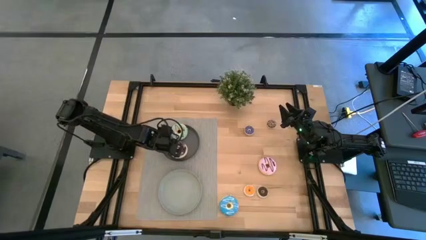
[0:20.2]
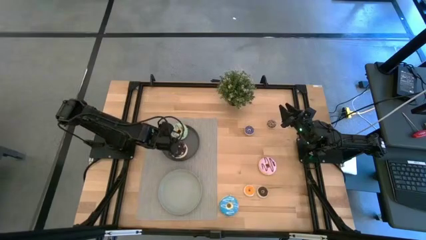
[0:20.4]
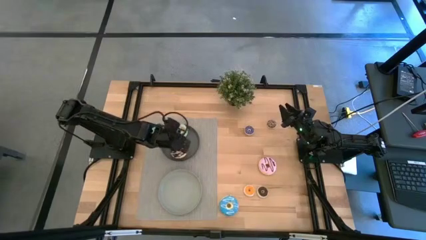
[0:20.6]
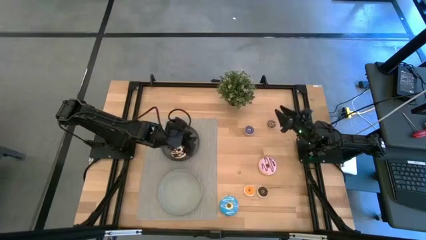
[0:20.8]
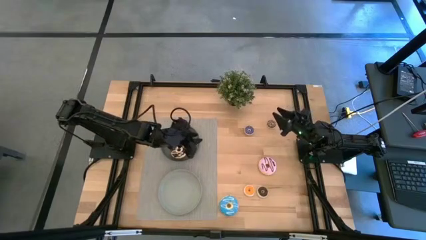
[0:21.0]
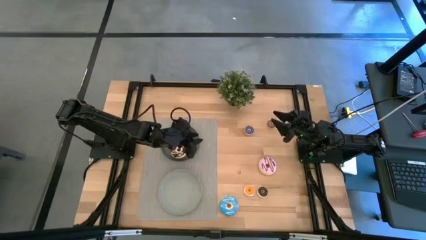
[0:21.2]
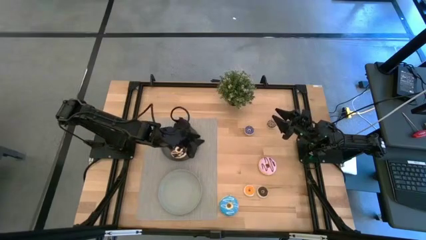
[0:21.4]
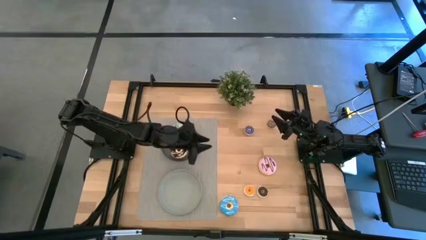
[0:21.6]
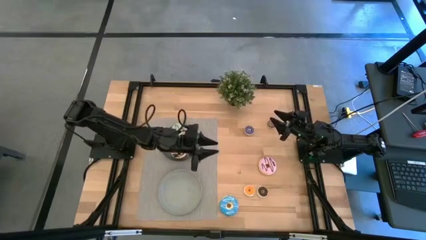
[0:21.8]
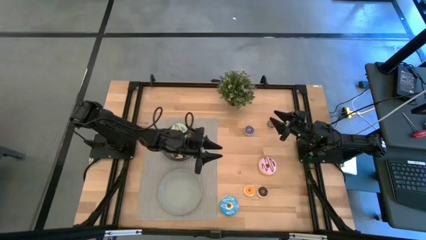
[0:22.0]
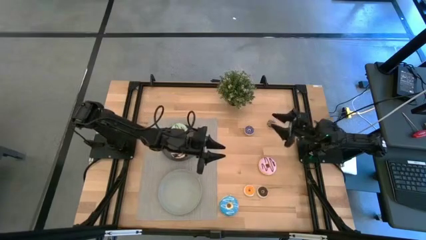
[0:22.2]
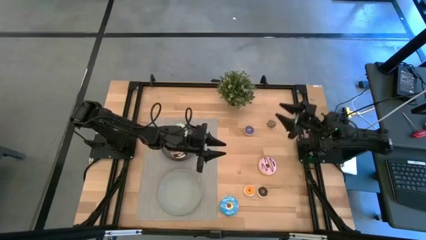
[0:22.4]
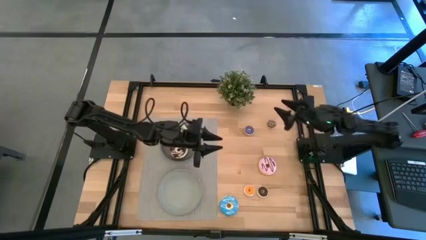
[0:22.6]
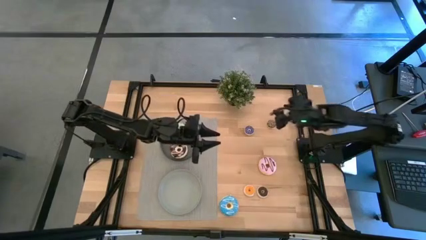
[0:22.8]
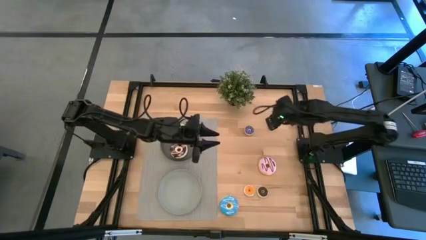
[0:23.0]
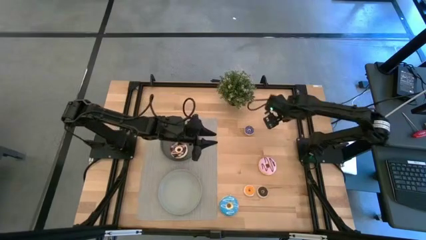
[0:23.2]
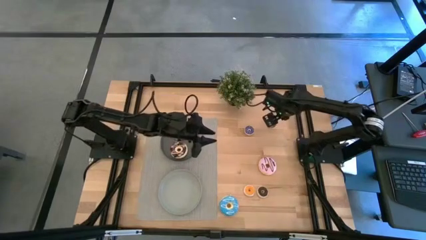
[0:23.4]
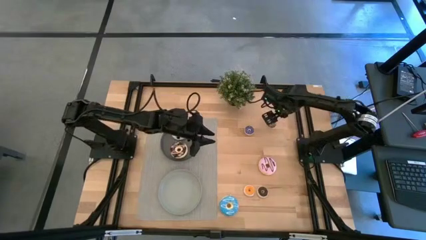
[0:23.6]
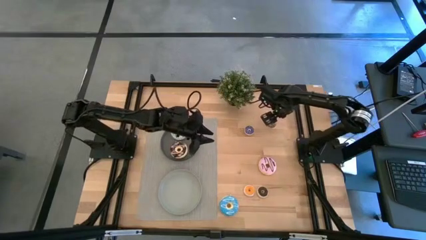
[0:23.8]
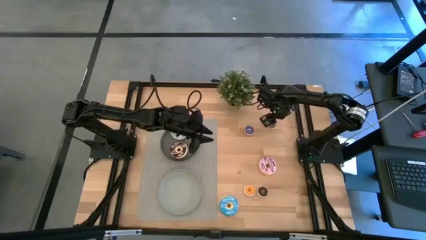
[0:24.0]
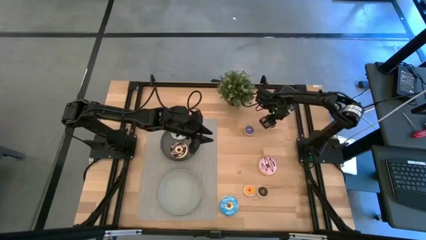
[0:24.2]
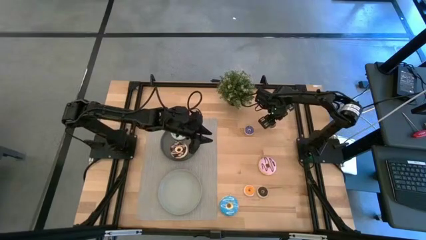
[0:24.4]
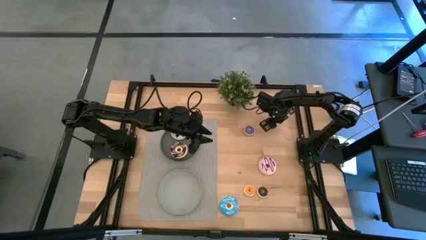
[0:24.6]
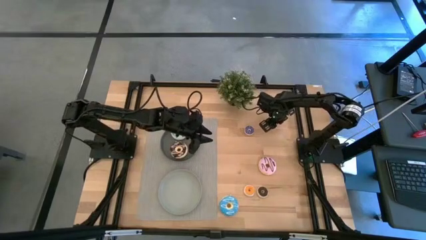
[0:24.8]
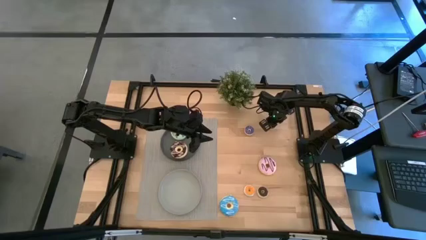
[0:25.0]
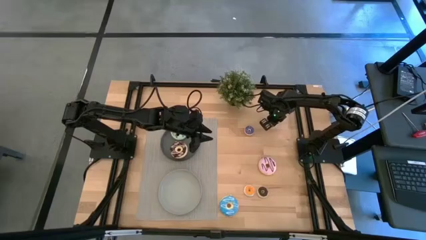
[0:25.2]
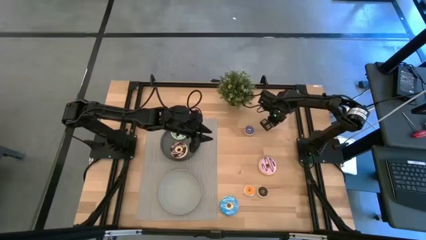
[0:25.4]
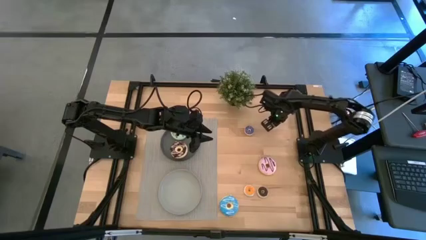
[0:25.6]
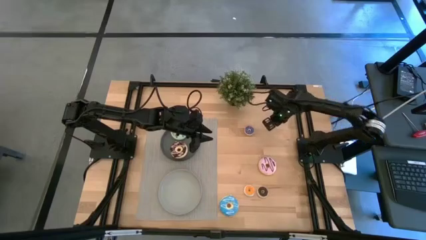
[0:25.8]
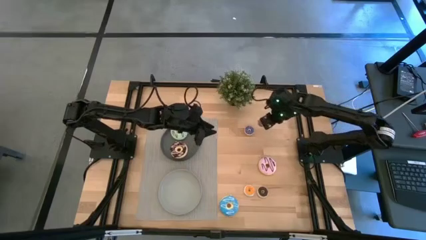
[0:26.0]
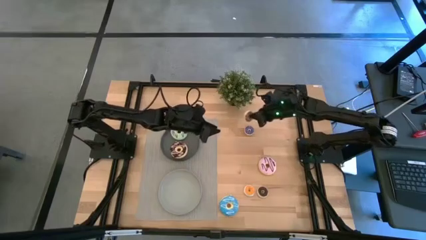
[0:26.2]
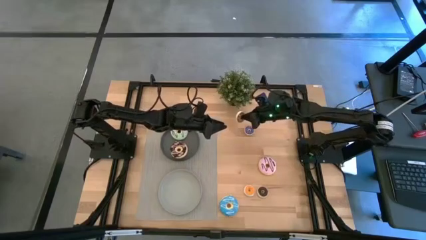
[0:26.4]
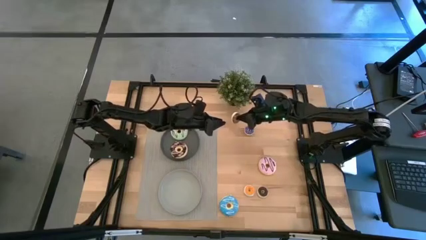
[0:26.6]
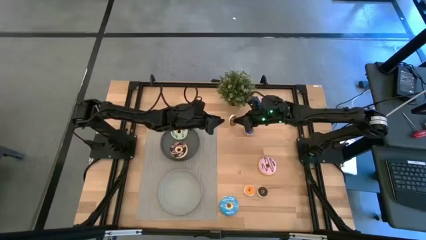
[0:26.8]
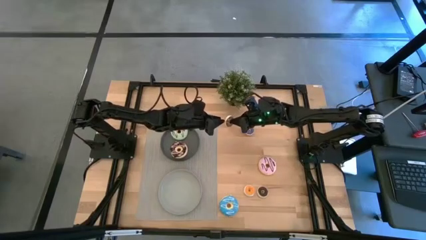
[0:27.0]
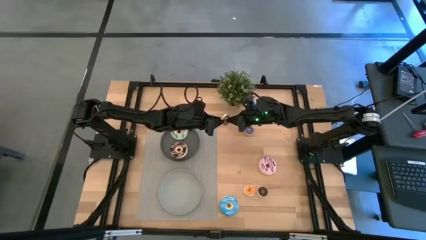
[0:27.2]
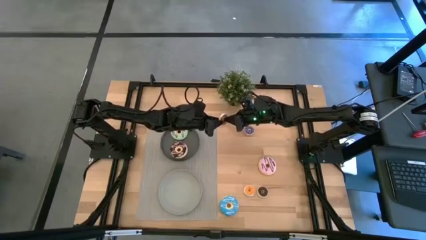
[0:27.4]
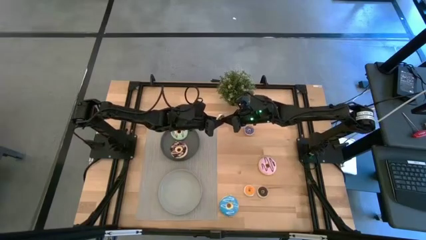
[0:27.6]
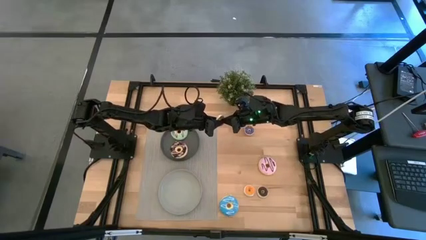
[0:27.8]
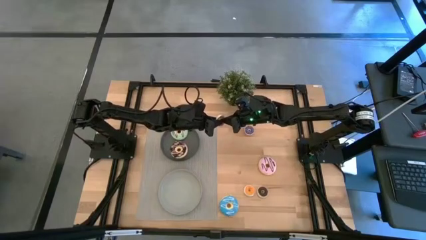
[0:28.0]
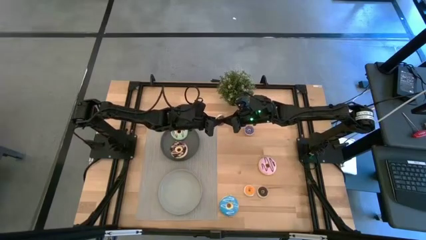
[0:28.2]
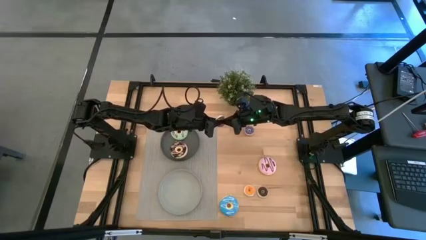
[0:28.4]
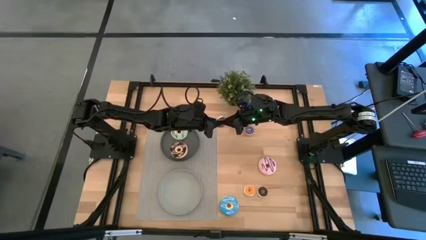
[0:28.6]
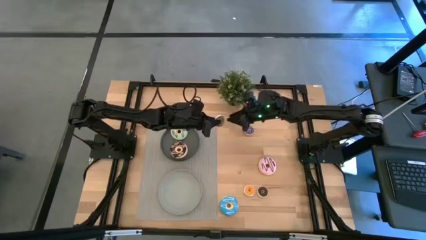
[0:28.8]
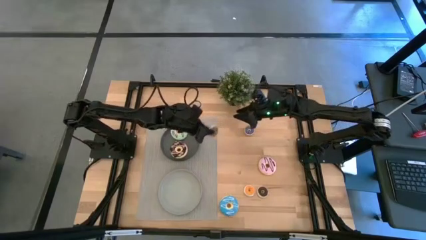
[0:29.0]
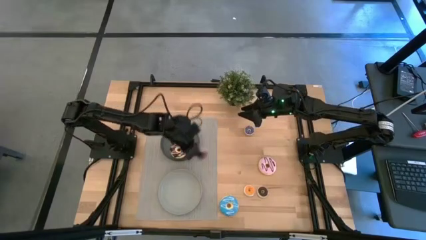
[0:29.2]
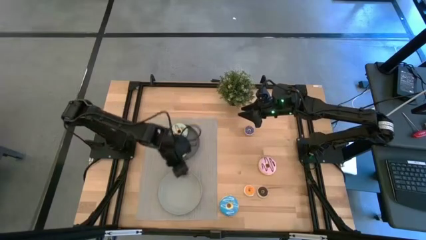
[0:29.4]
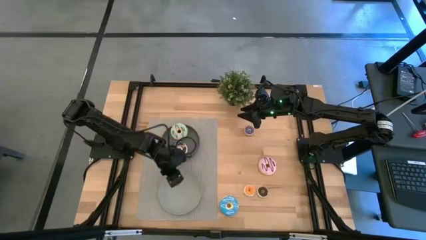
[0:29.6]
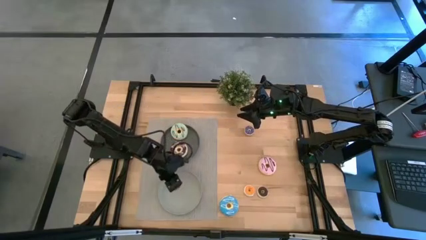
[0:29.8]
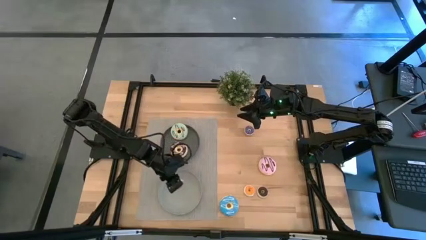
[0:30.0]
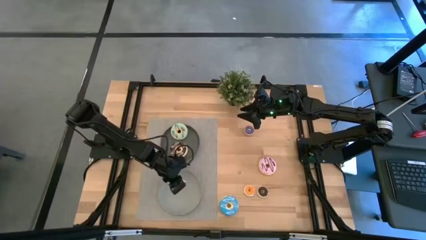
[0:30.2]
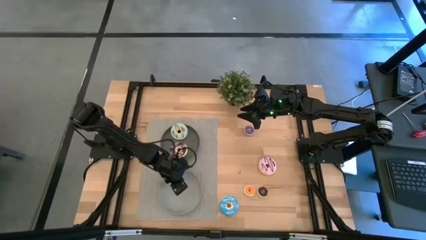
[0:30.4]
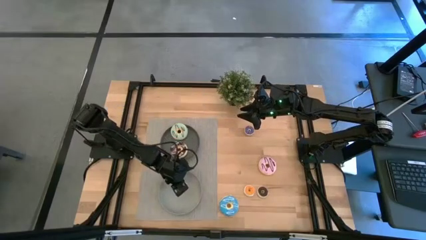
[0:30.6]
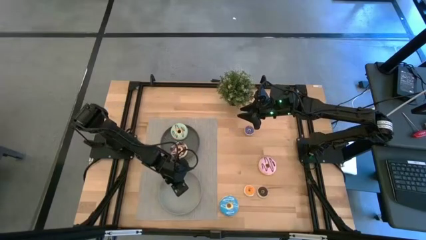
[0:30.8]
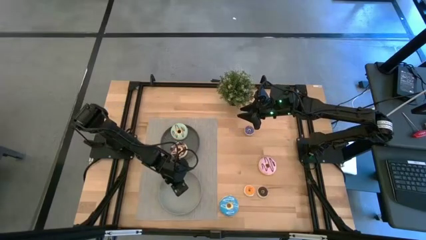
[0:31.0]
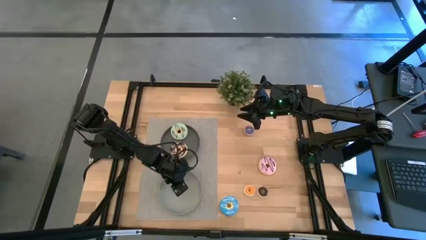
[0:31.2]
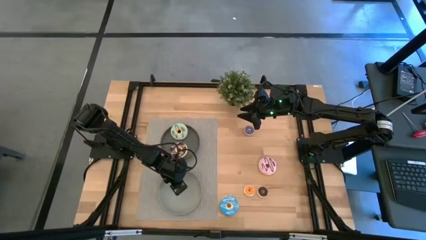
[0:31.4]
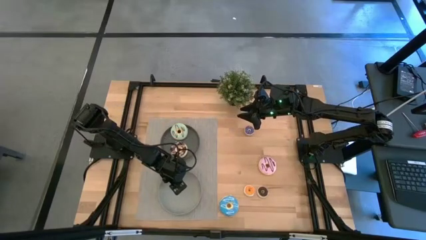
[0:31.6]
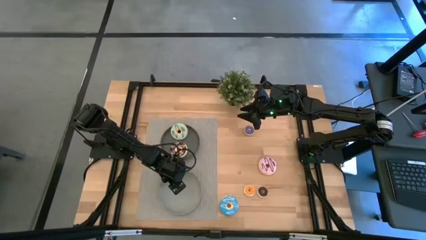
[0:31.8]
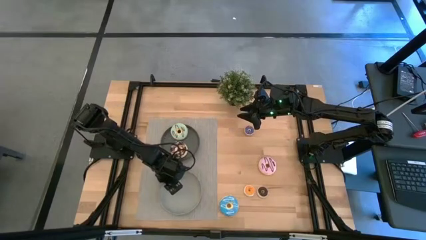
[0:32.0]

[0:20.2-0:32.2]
Task: Pick & Place donuts
Put the small brown donut on the gray plate

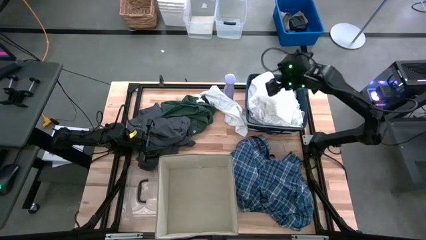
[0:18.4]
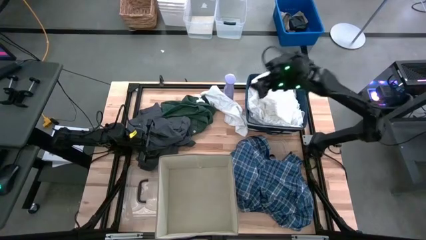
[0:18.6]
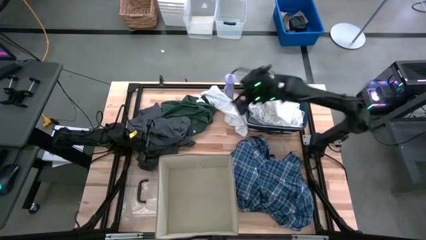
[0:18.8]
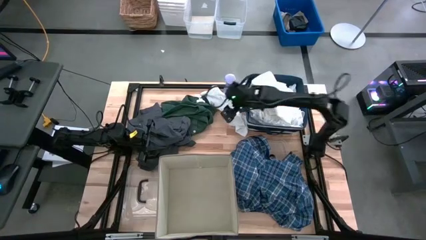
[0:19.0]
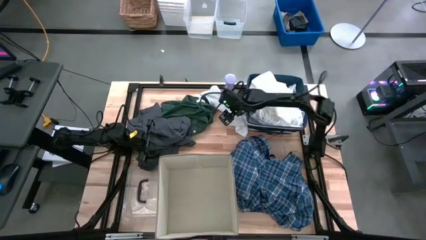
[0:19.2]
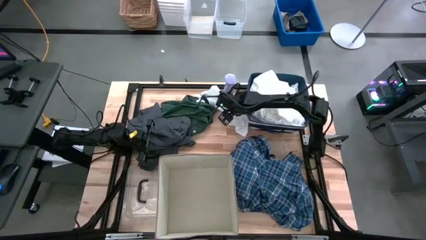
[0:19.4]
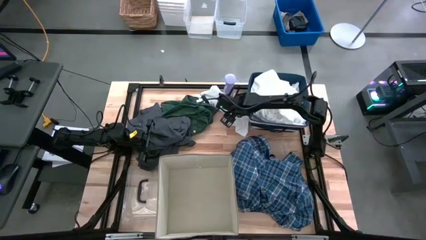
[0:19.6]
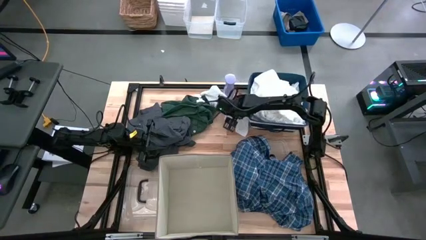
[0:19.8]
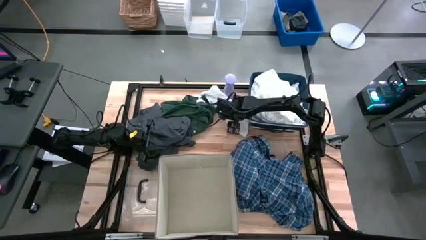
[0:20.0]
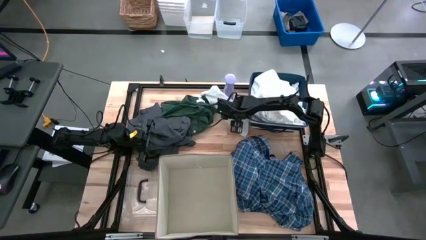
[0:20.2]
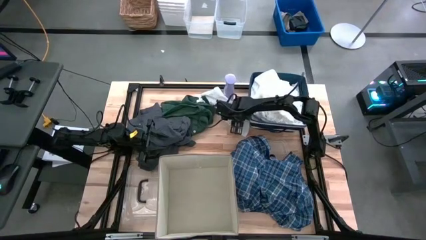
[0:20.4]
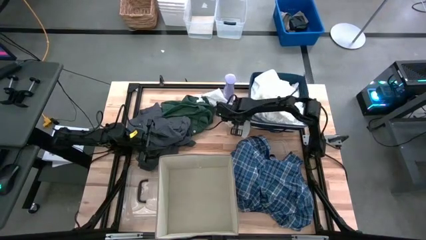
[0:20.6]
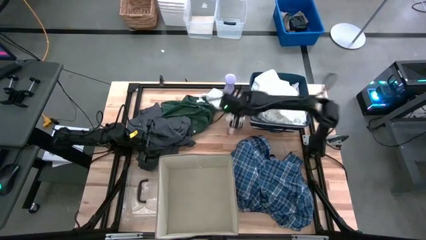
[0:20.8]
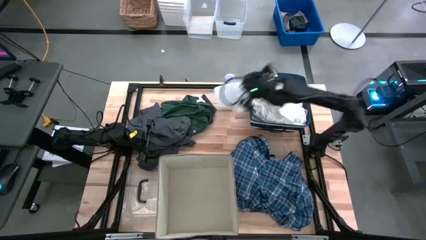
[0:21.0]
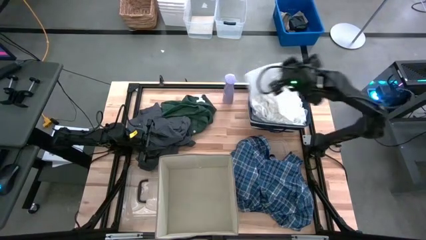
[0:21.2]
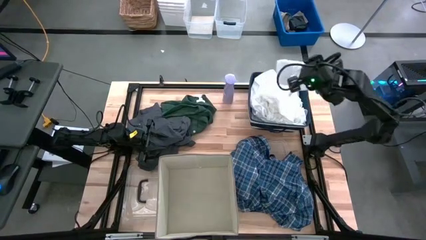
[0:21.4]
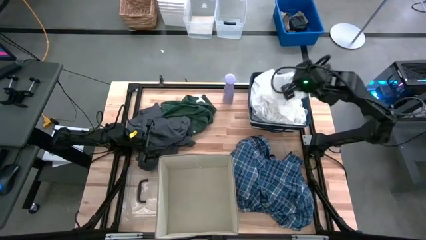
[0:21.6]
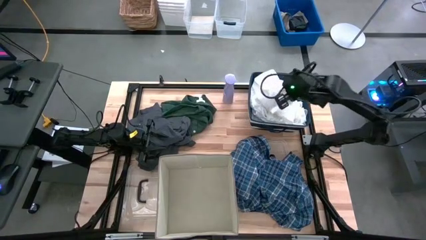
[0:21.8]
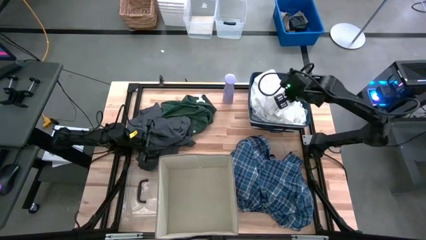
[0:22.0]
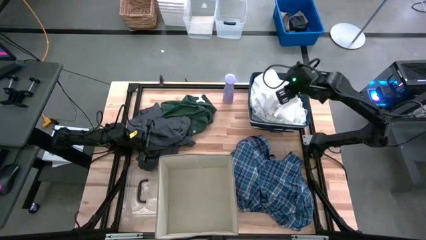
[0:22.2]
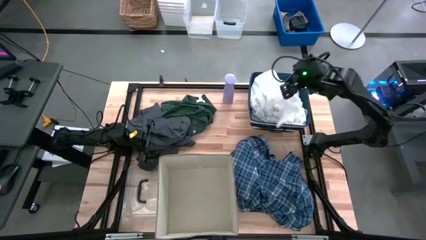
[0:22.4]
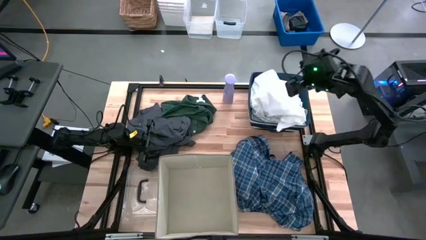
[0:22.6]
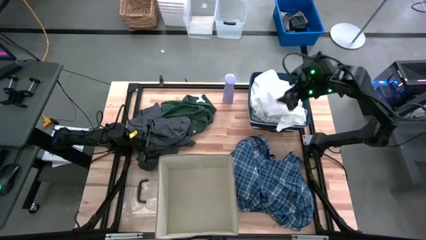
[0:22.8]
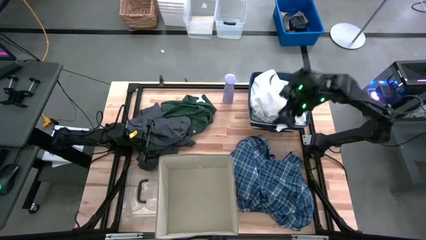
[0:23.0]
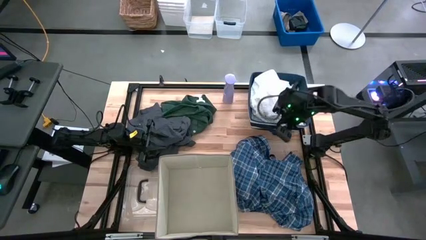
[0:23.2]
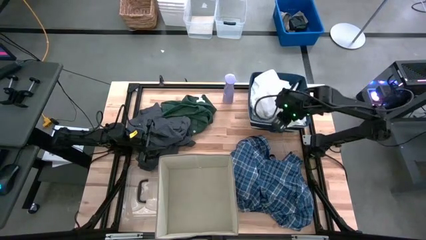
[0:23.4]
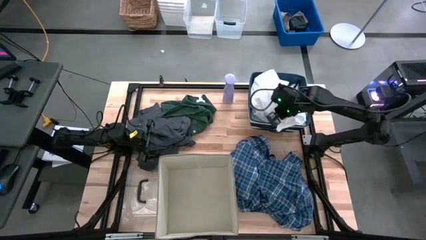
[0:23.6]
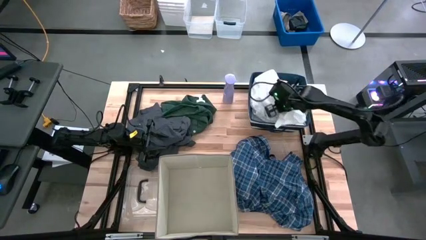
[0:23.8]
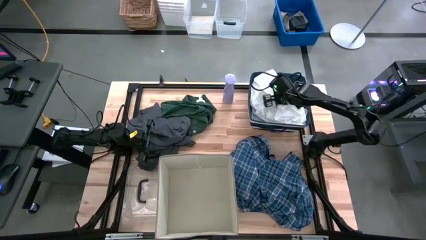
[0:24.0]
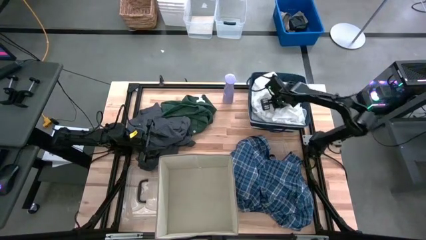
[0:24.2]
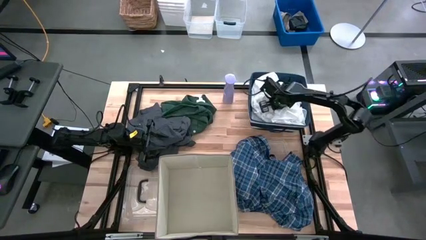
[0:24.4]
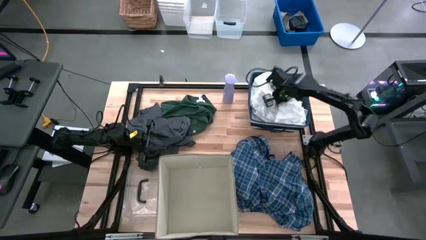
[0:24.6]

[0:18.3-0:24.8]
Task: Sort clothes
Put the white underwear into the blue bin
